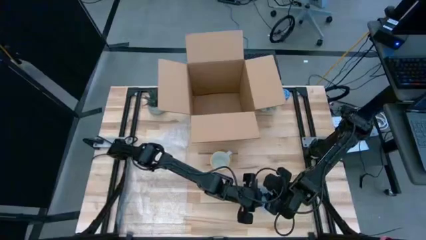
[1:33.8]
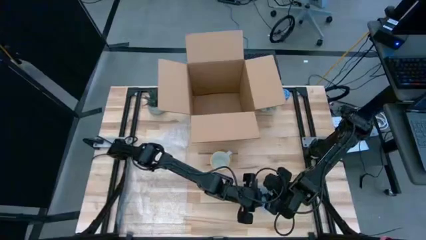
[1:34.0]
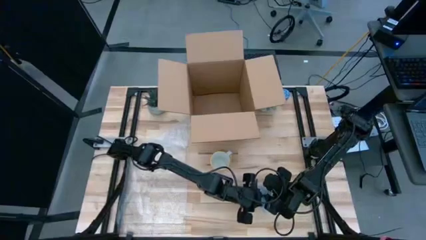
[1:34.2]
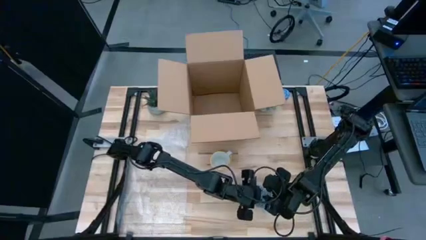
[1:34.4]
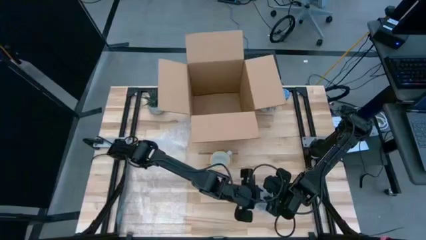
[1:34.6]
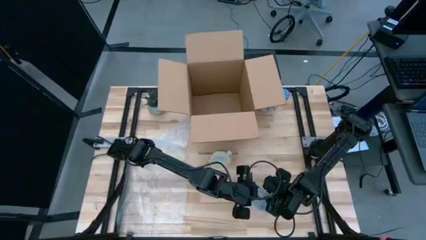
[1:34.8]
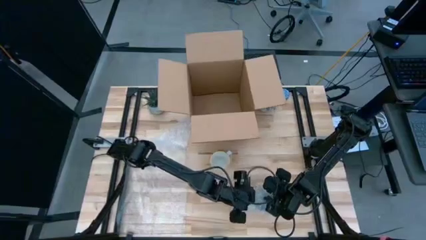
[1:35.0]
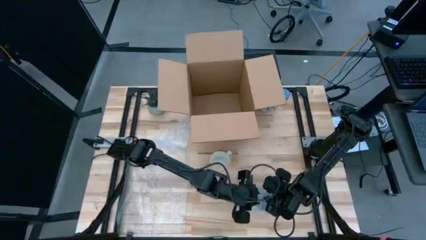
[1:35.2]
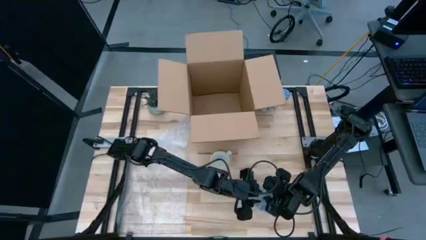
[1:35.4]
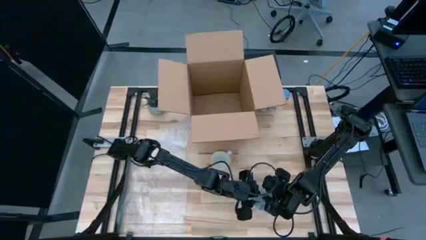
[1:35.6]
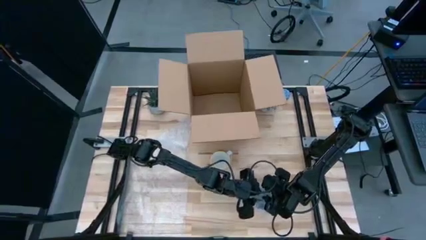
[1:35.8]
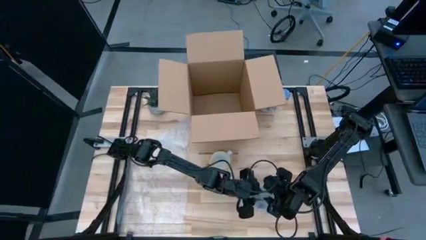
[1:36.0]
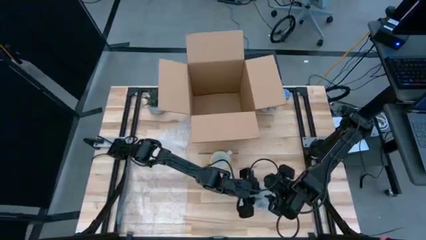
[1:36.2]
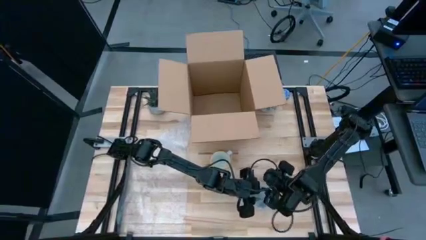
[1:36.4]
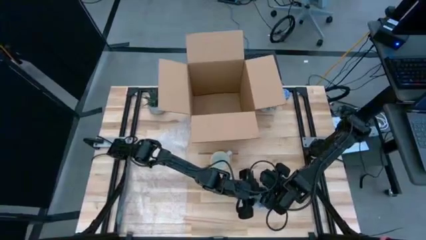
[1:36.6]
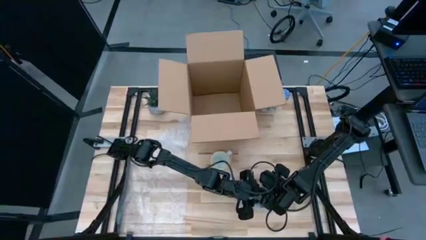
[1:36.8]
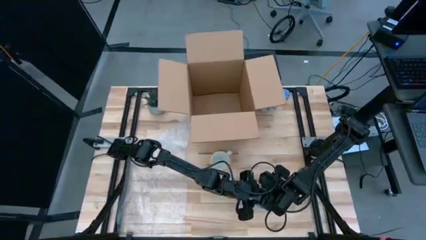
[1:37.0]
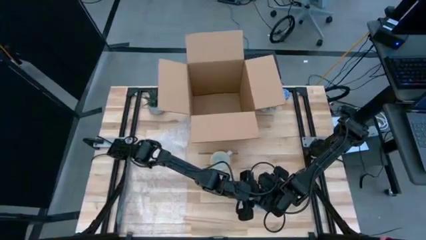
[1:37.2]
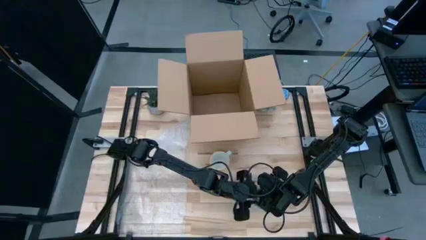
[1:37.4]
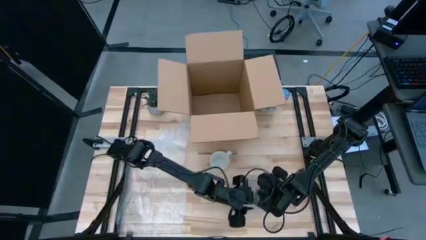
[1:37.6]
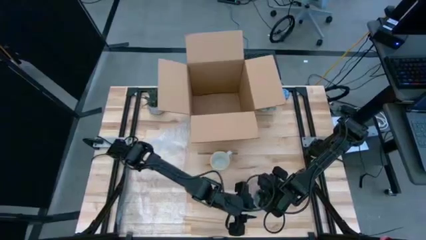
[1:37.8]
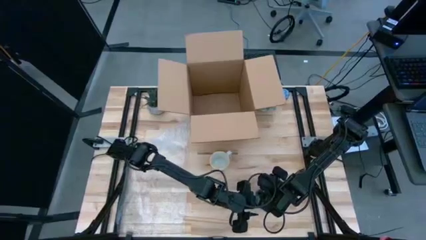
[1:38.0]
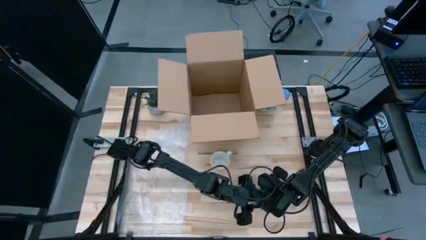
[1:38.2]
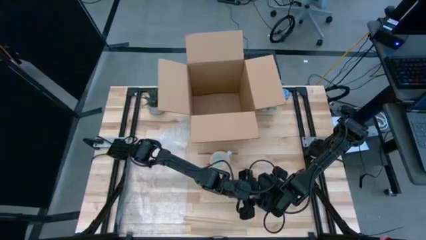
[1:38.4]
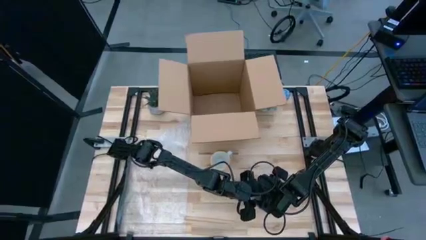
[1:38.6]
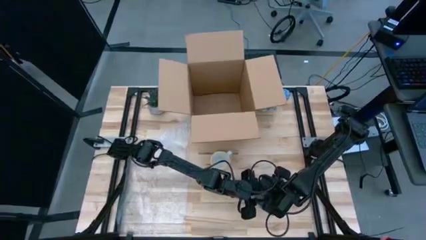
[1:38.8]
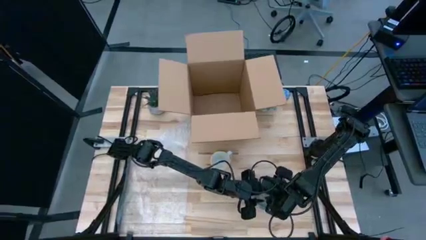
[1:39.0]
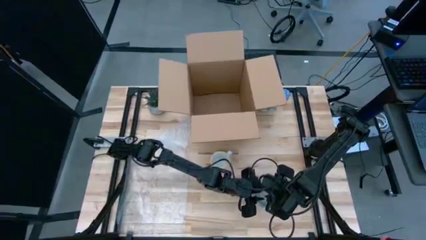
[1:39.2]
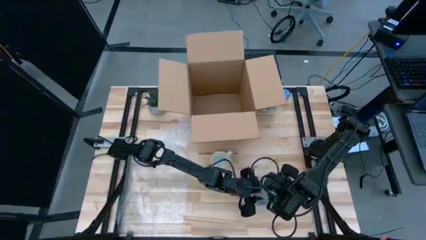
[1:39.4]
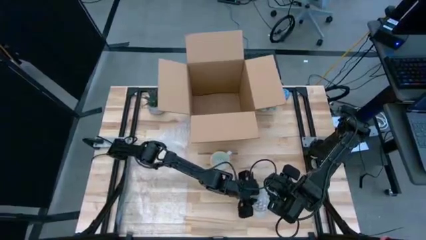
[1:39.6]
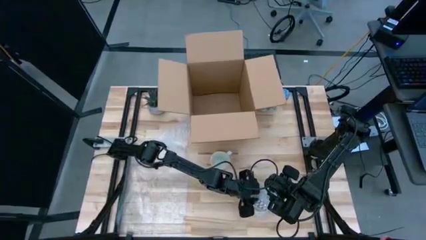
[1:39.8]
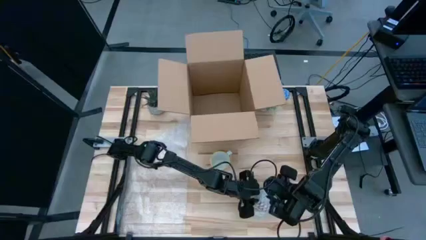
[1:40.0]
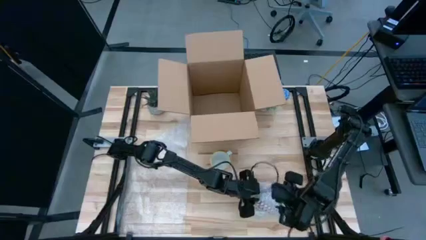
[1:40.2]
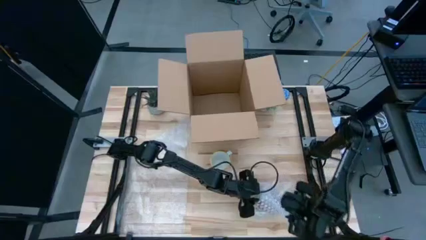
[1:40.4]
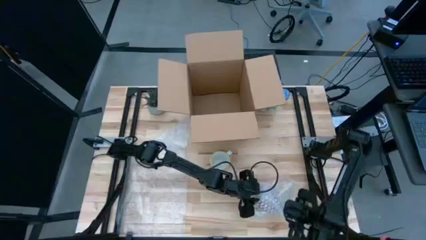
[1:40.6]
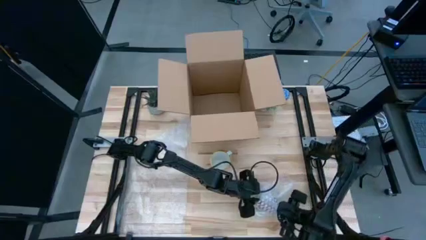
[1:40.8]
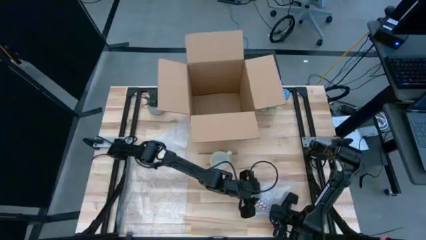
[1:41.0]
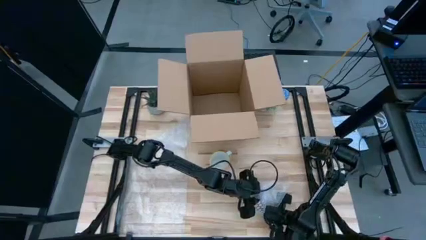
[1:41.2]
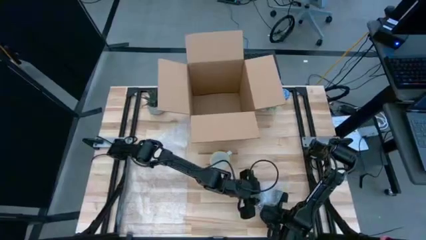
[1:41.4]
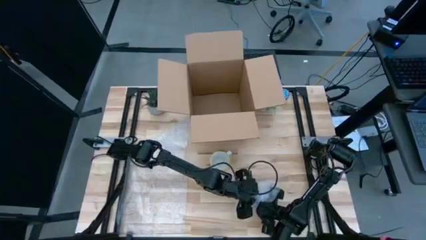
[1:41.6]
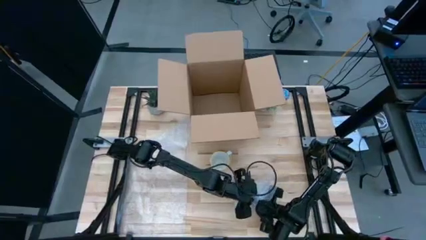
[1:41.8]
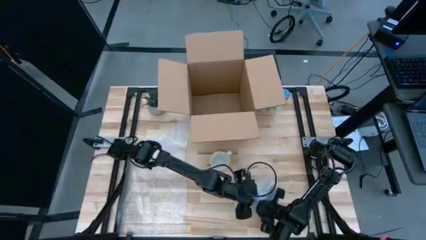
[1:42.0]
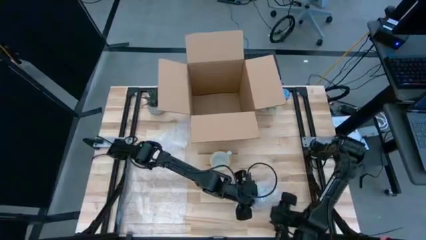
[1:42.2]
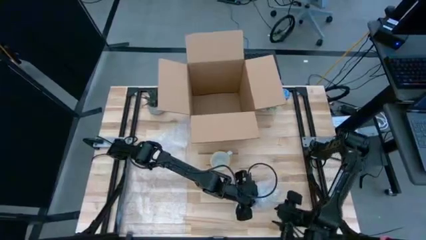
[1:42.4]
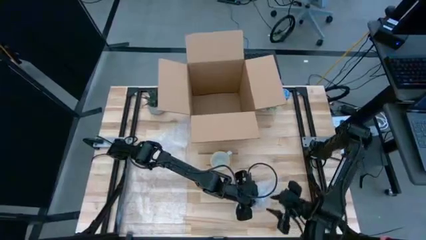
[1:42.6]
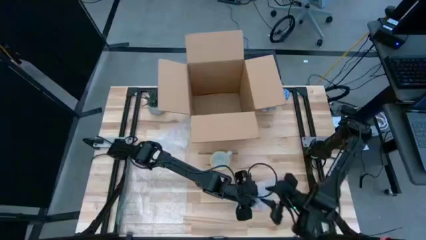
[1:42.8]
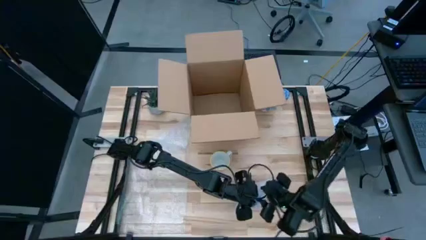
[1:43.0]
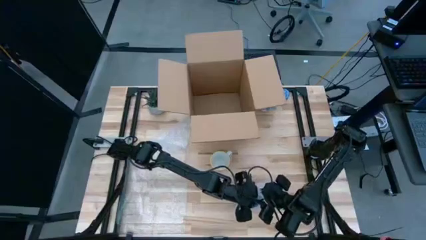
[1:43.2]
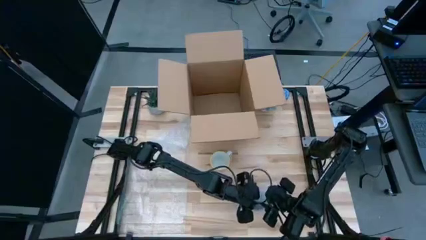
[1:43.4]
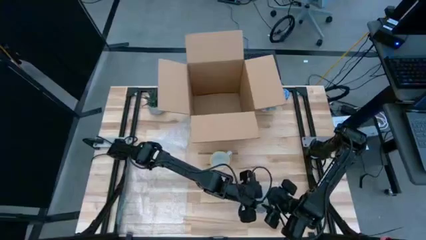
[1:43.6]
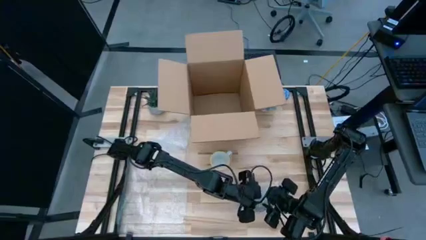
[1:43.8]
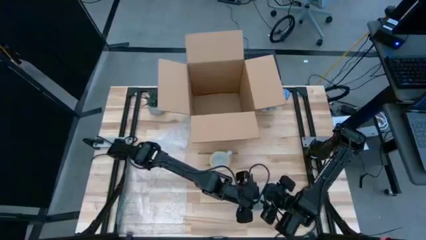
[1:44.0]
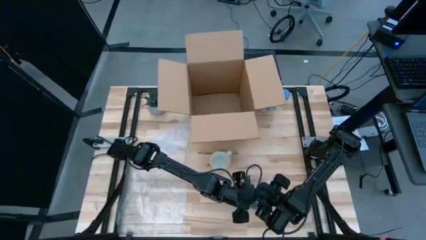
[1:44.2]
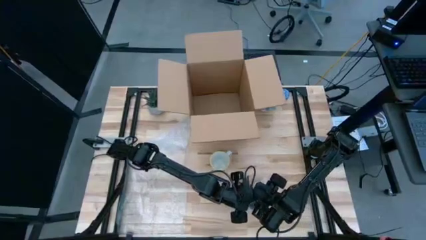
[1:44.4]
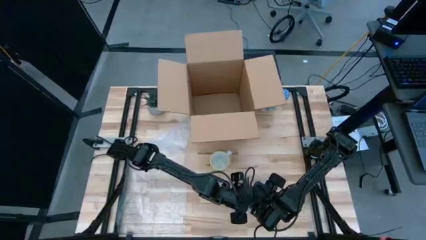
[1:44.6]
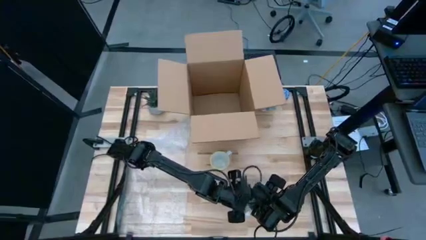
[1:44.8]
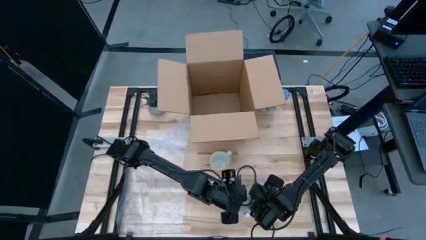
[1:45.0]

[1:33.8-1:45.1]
Task: wrap mug
Wrap the red mug with bubble wrap

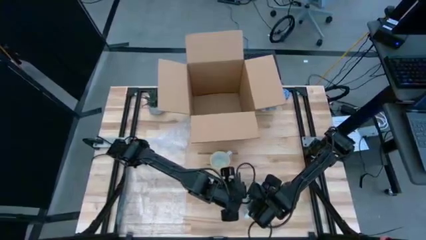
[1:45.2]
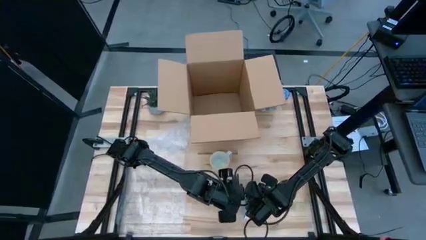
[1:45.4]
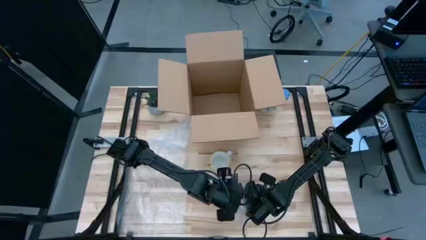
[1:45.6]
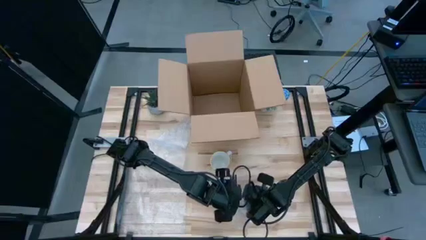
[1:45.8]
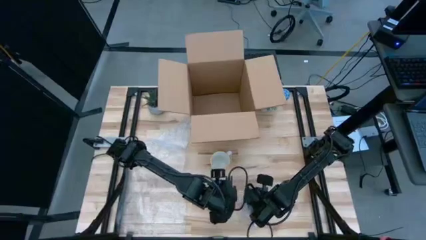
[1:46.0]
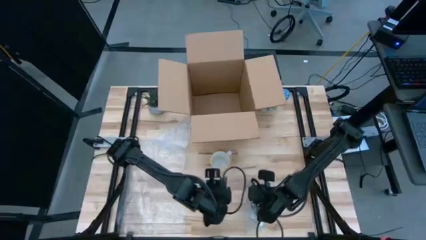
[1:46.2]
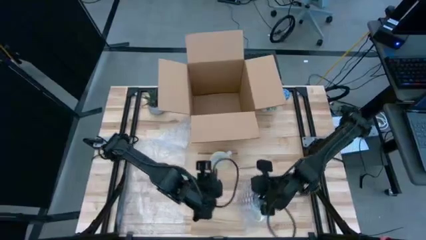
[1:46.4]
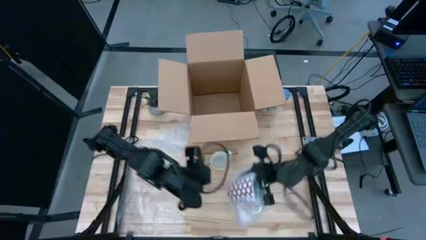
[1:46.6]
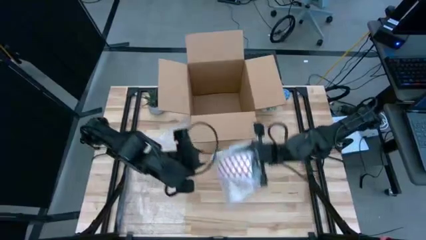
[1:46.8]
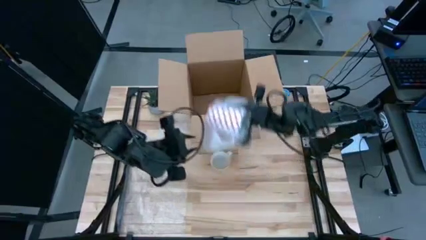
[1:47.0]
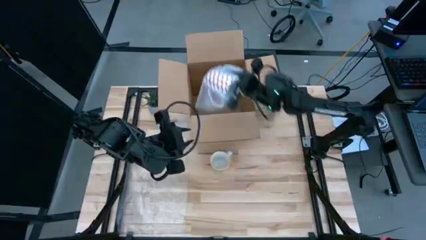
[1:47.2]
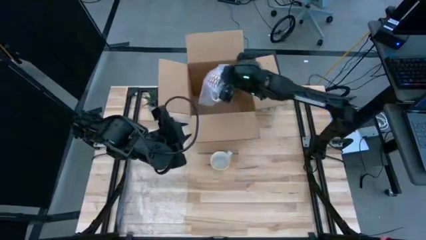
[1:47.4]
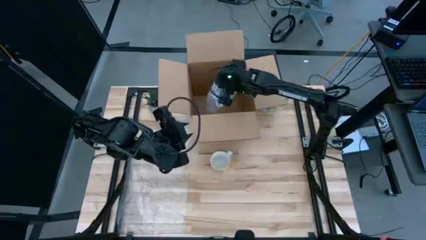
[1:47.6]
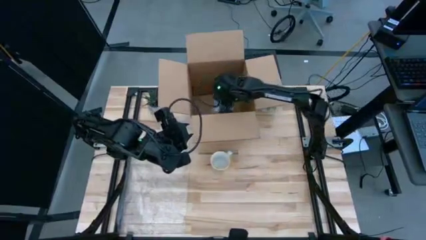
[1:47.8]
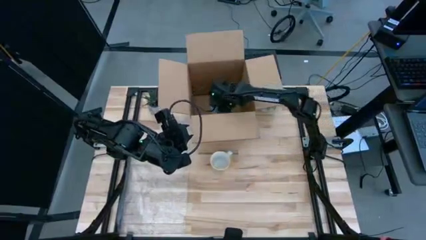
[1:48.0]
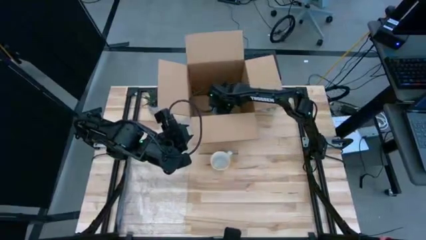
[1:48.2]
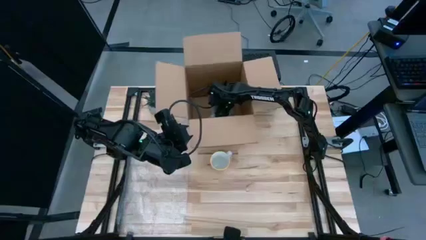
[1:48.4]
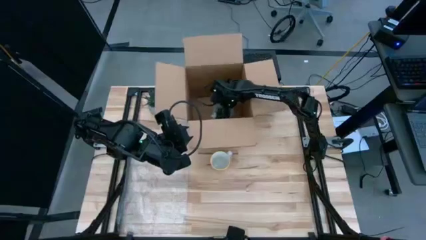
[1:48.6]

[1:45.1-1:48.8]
Put the wrapped red mug into the brown box
